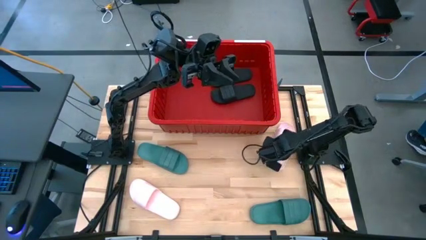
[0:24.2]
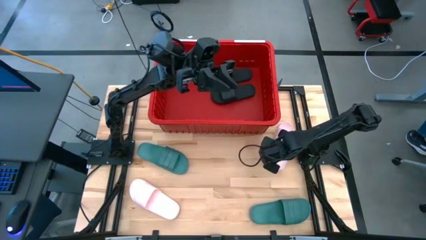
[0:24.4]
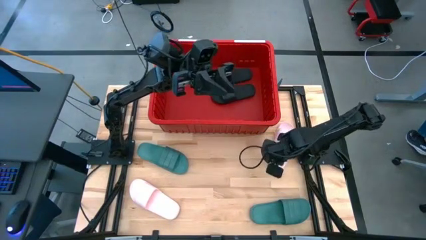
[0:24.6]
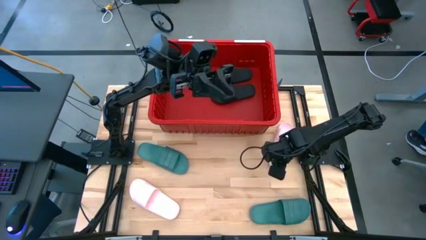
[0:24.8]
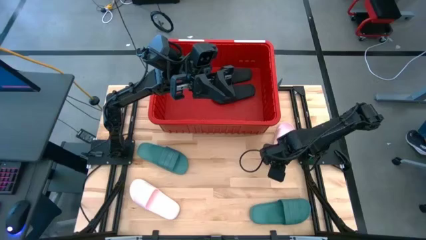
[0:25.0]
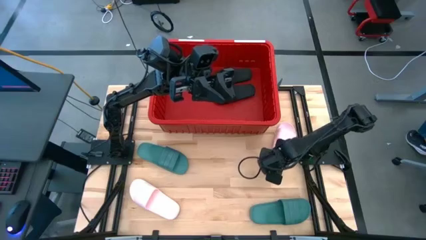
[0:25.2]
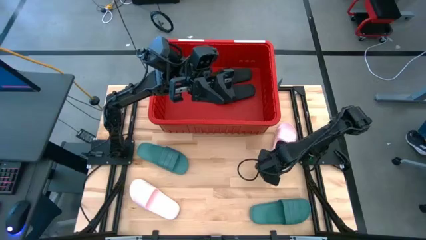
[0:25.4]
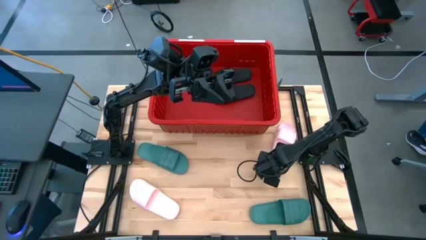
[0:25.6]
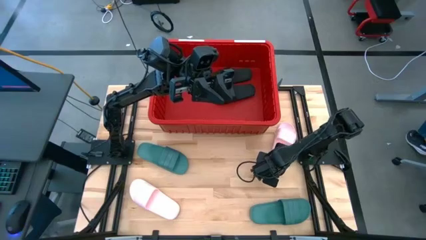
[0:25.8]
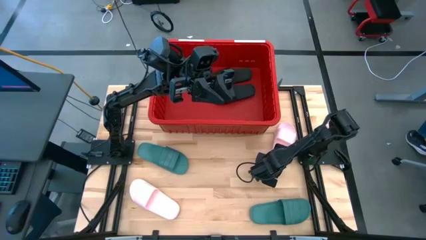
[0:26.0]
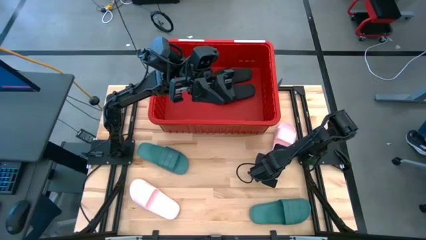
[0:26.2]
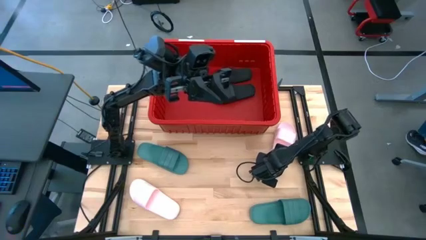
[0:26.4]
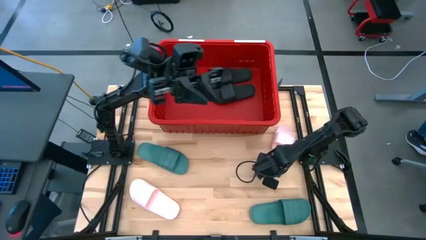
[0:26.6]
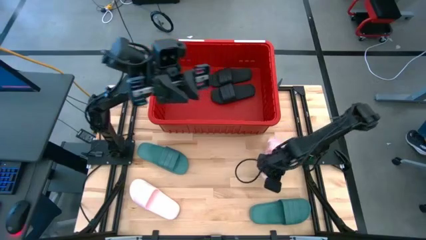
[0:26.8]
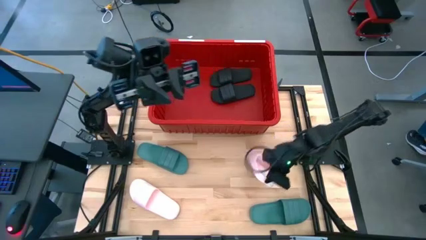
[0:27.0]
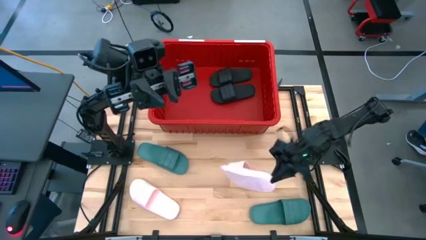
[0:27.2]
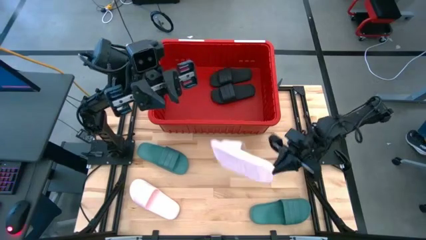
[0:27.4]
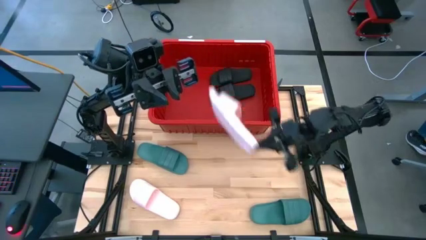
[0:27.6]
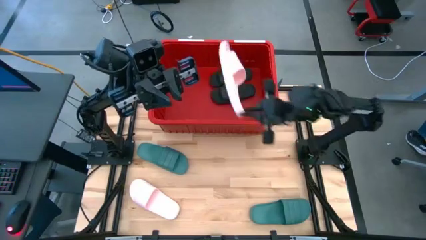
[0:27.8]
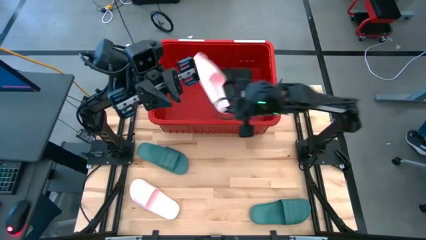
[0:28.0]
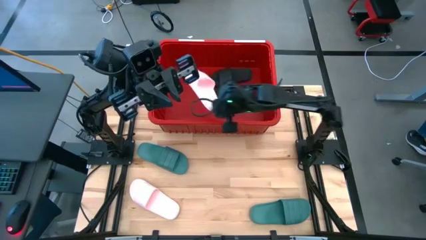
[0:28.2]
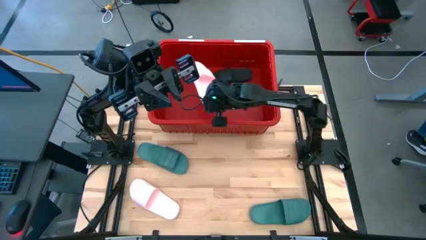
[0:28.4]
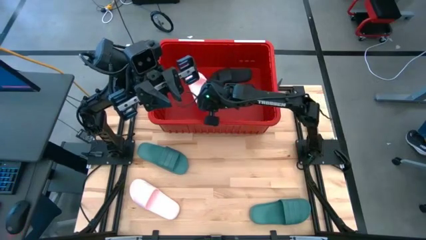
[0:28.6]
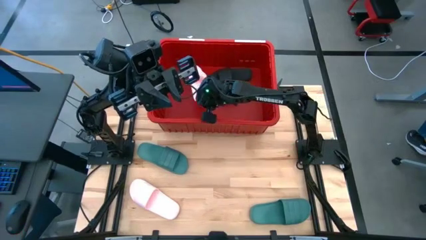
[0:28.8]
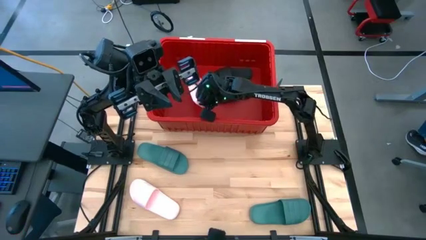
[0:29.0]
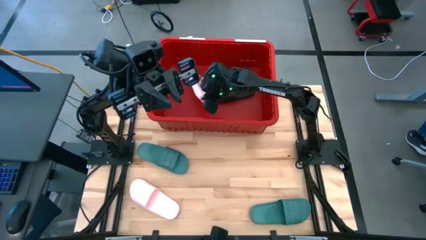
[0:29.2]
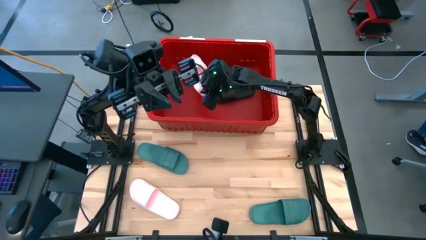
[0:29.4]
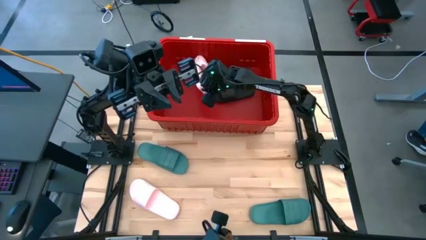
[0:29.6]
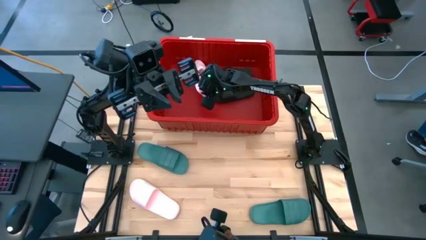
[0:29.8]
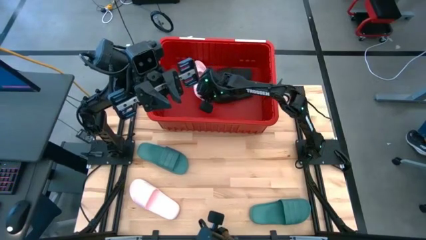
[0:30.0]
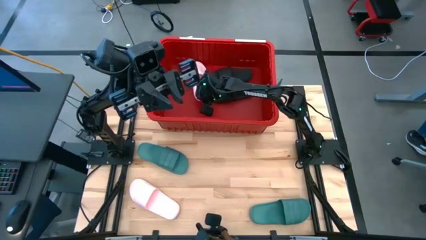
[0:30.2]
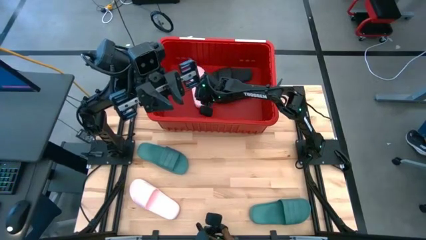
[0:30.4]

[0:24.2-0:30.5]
Task: Pick and place slides into bin
Put the right pink slide into the red bin

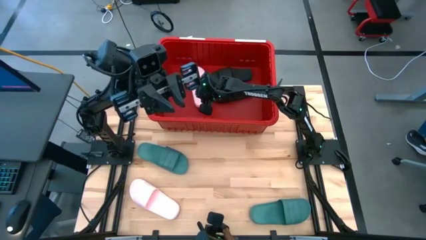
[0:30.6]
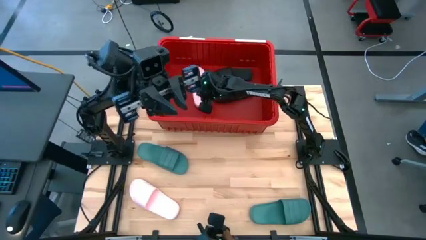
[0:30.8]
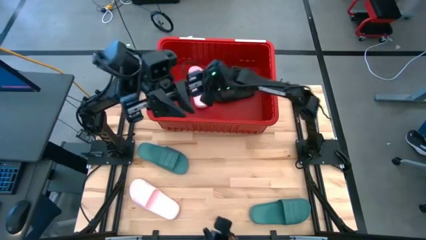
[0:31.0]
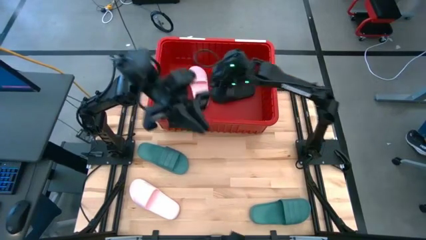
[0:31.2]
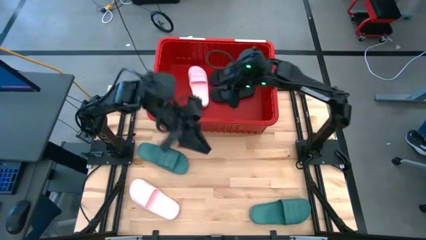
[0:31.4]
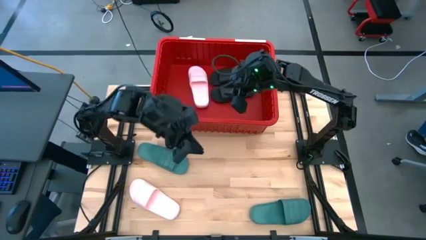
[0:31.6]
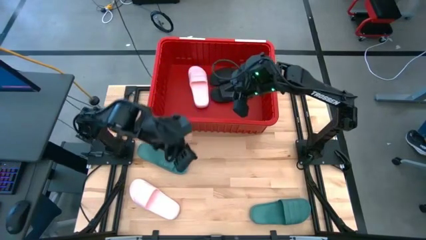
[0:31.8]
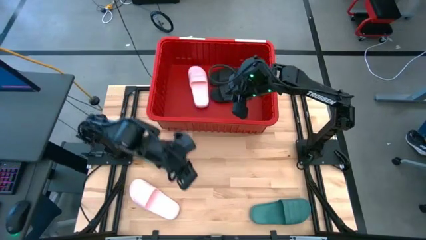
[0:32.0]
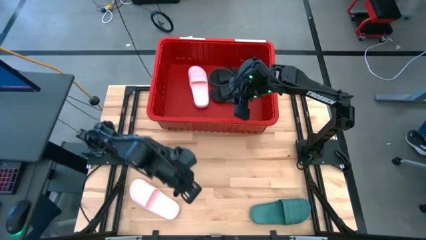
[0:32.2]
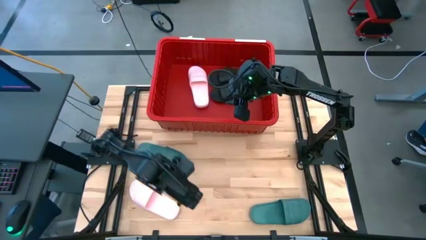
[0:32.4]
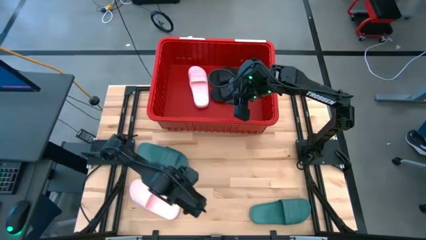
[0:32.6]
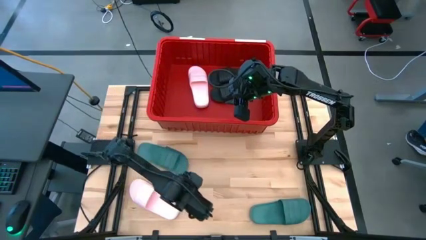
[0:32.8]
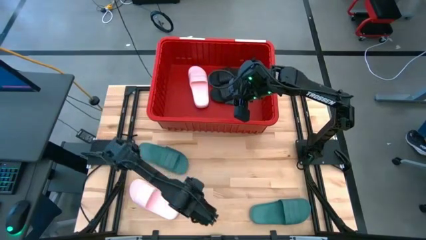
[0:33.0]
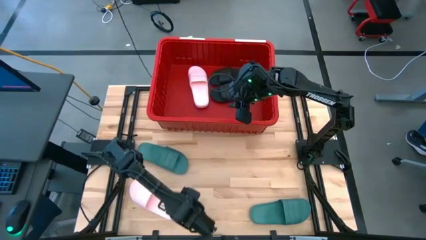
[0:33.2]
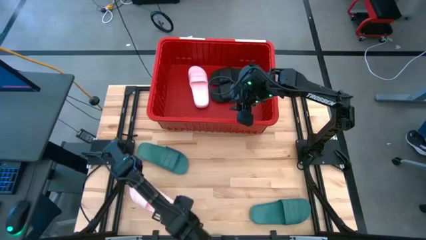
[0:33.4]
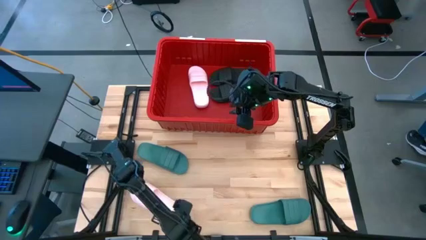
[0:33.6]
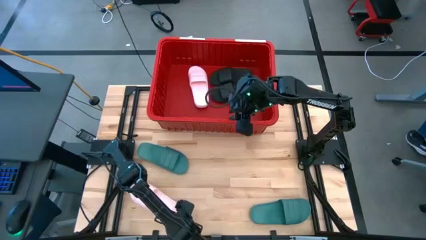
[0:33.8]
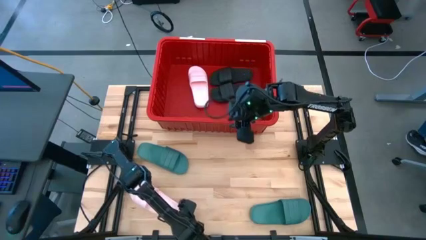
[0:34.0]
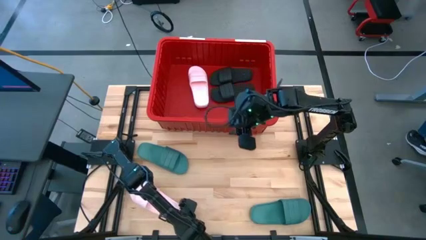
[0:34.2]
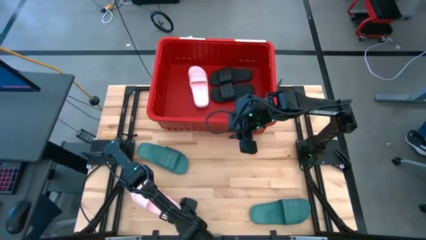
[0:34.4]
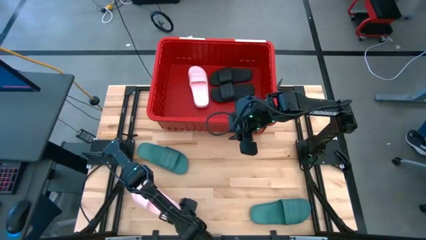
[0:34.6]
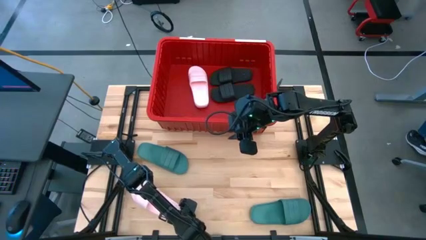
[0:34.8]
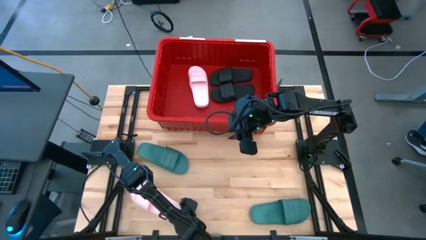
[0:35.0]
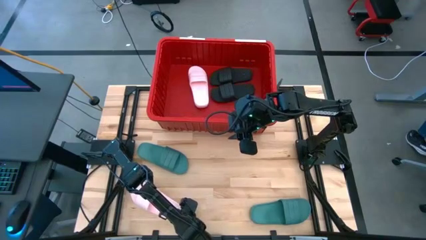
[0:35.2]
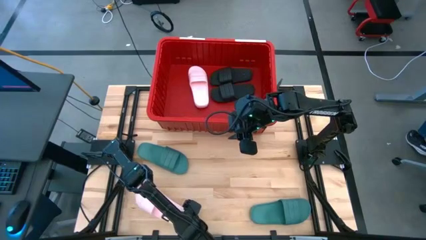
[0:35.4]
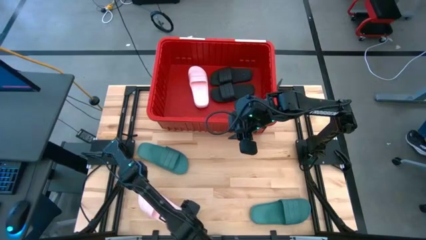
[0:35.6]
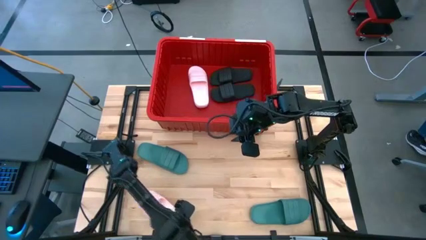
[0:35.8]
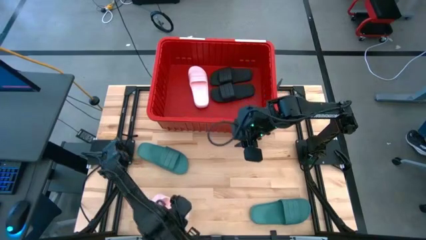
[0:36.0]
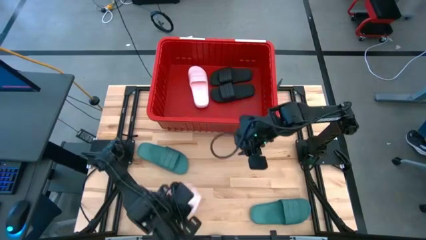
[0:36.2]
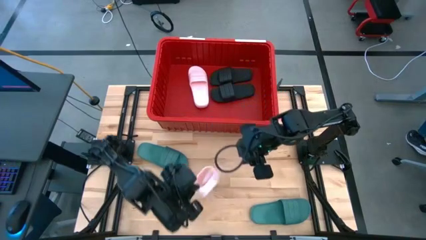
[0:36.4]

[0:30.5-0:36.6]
Put the pink slide into the red bin
